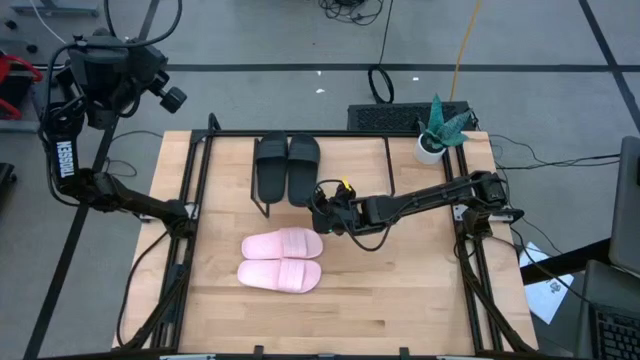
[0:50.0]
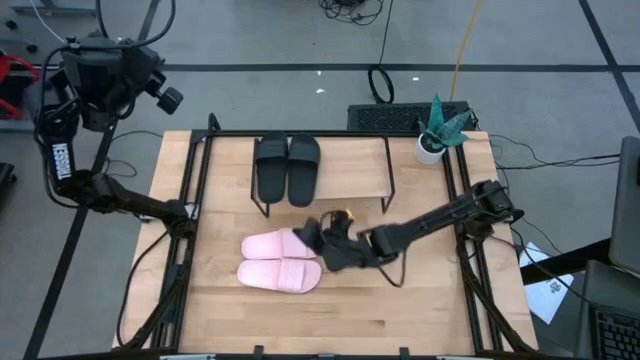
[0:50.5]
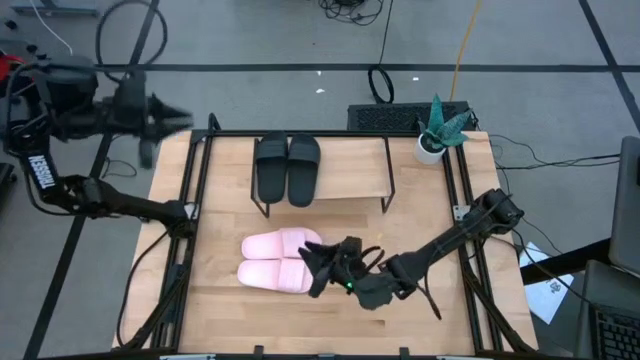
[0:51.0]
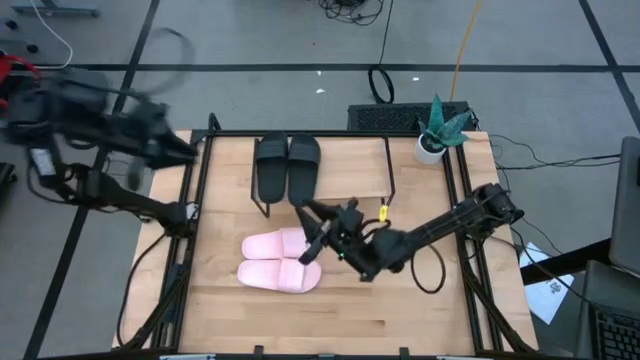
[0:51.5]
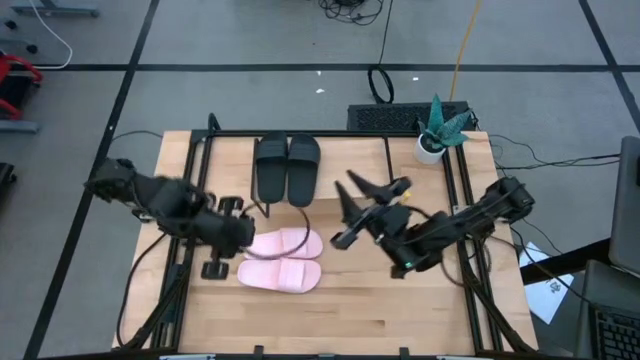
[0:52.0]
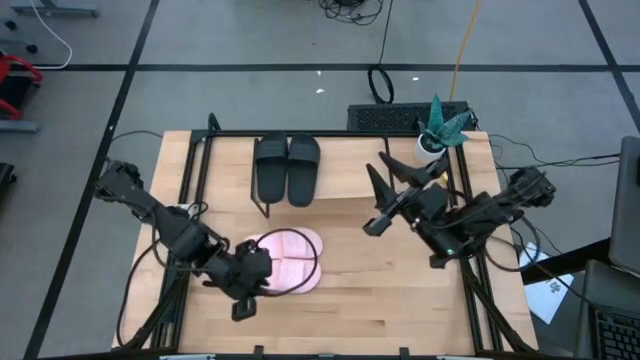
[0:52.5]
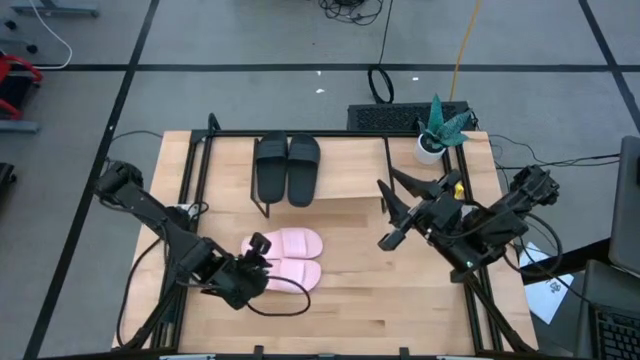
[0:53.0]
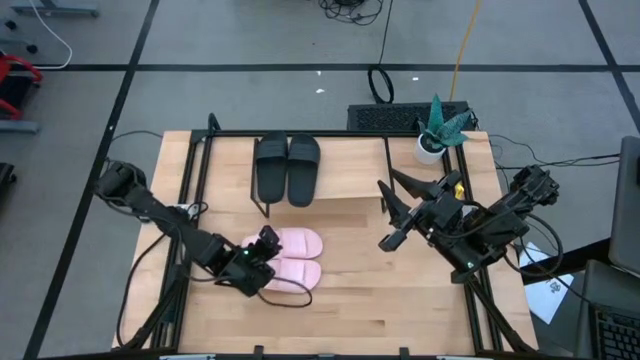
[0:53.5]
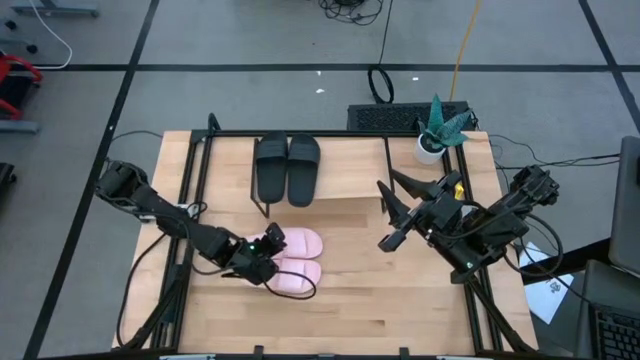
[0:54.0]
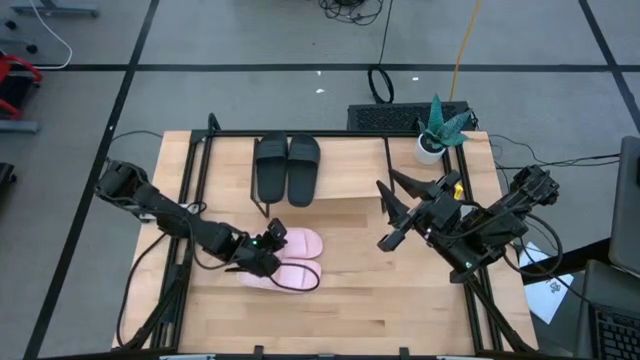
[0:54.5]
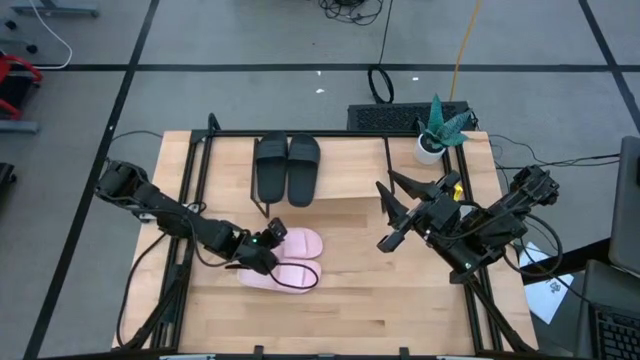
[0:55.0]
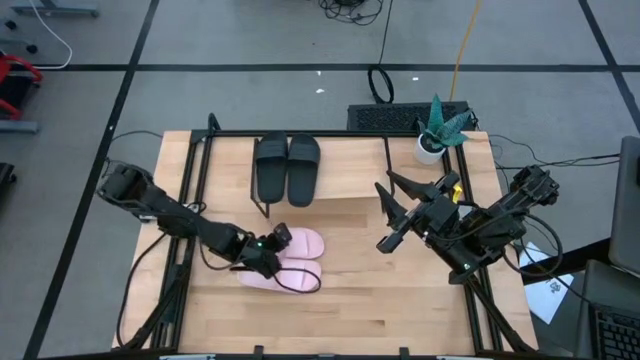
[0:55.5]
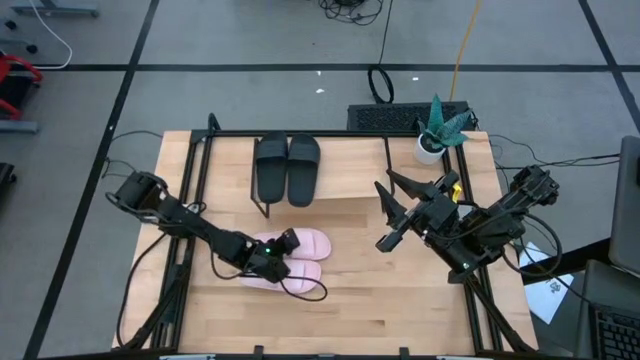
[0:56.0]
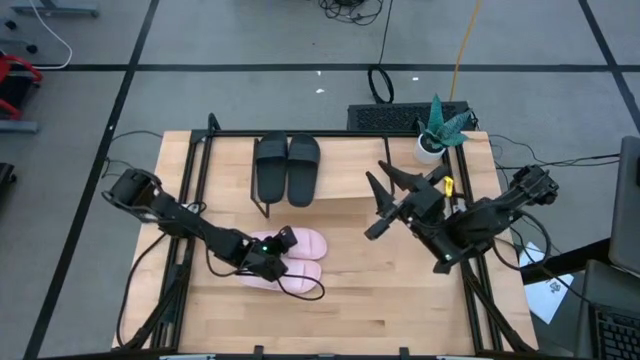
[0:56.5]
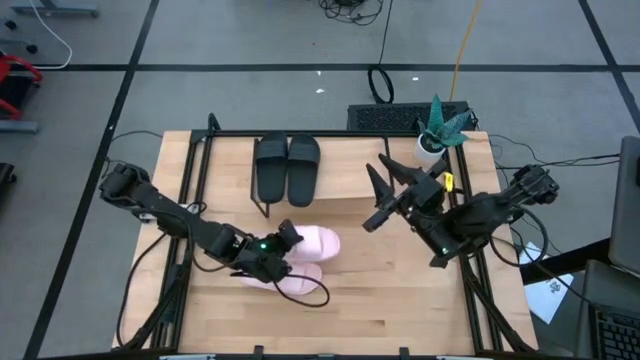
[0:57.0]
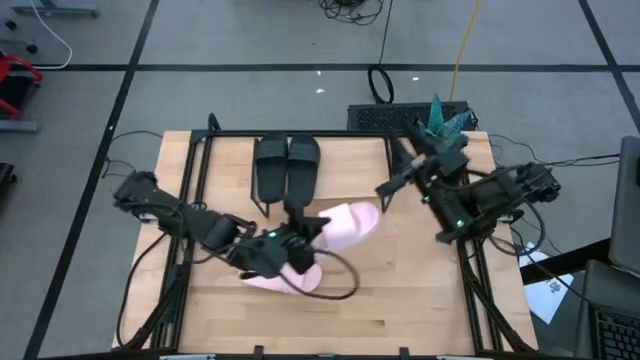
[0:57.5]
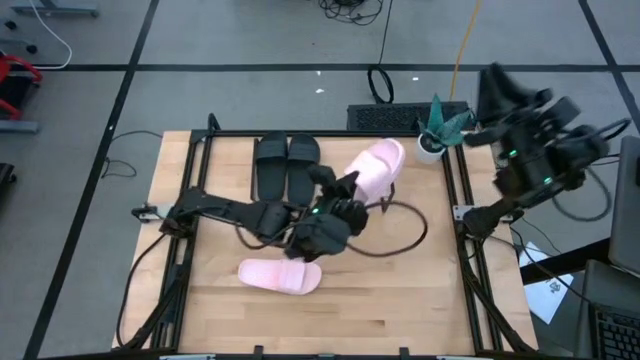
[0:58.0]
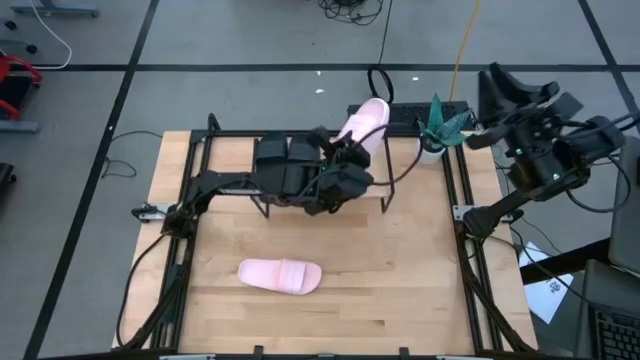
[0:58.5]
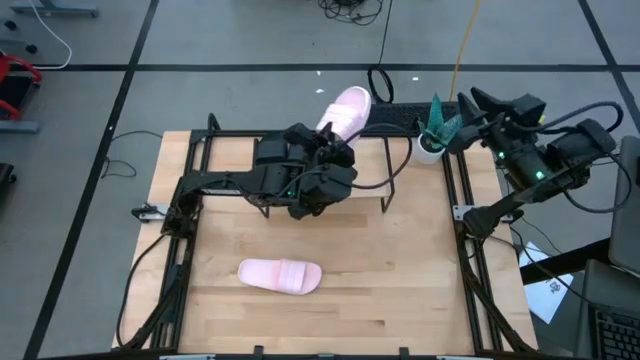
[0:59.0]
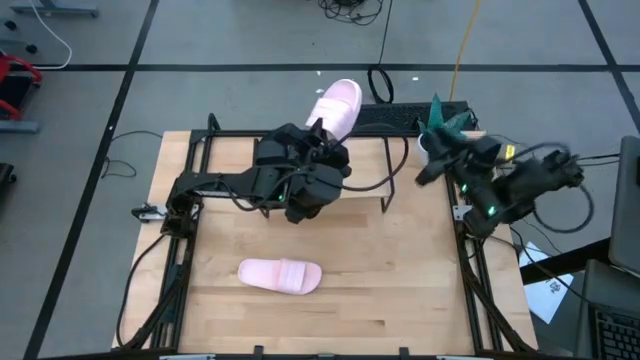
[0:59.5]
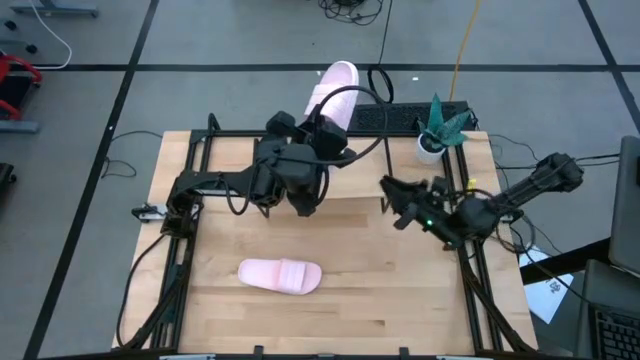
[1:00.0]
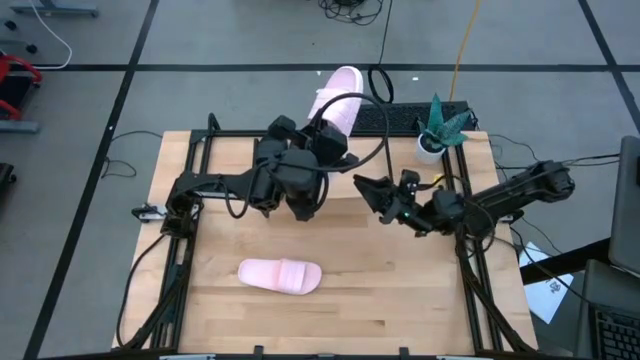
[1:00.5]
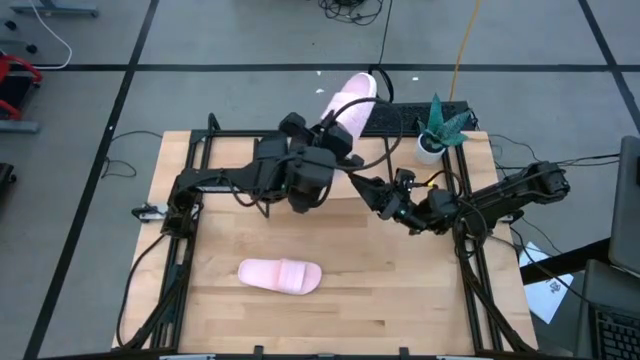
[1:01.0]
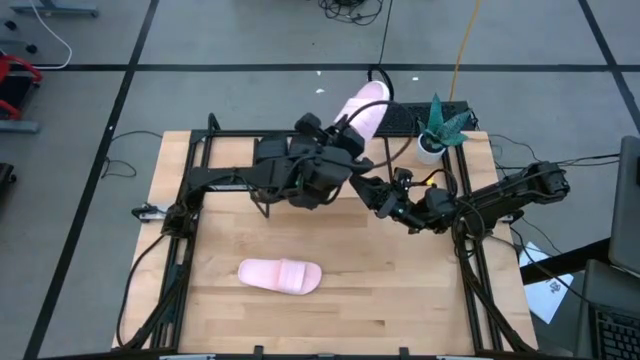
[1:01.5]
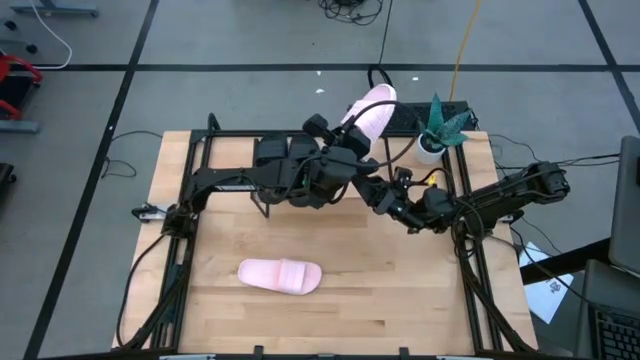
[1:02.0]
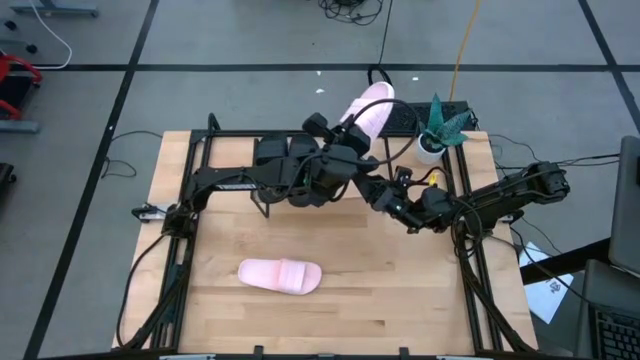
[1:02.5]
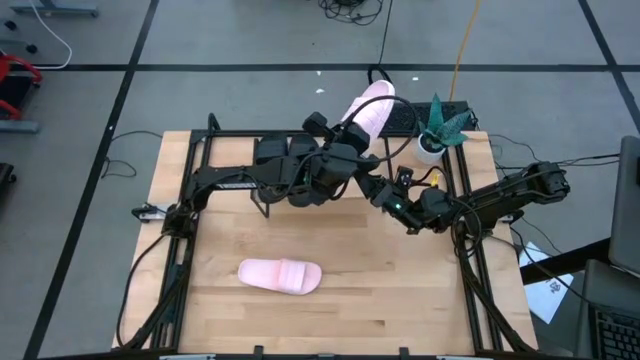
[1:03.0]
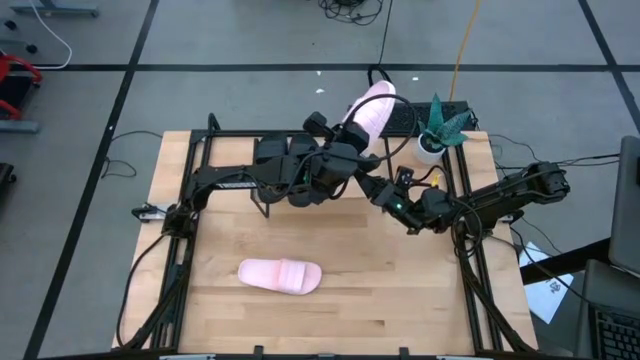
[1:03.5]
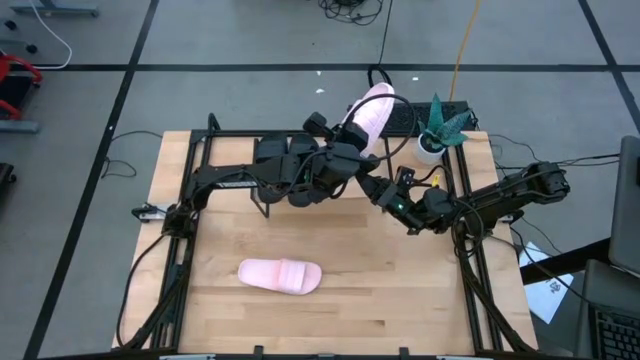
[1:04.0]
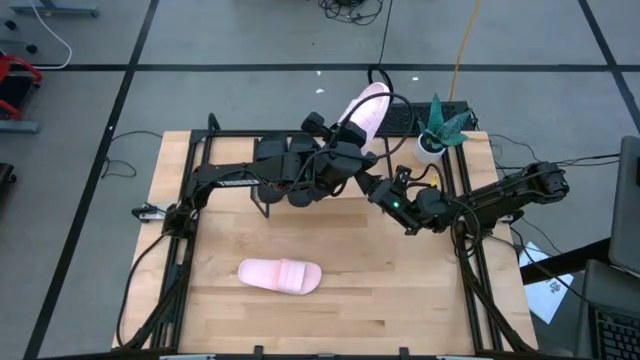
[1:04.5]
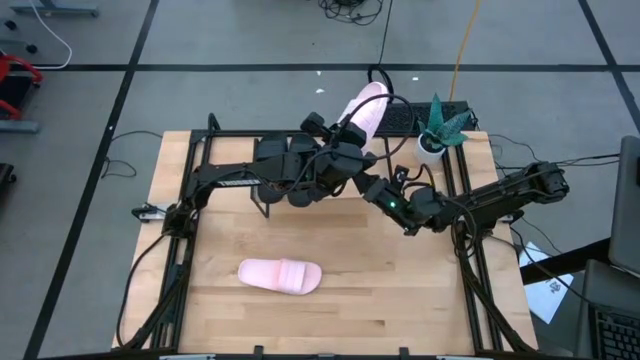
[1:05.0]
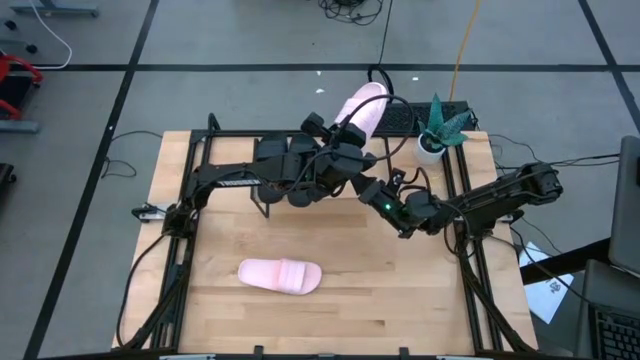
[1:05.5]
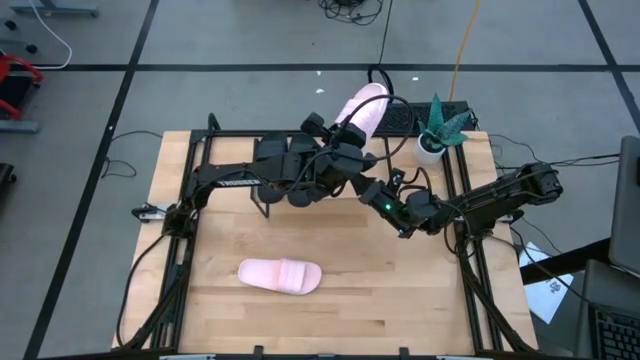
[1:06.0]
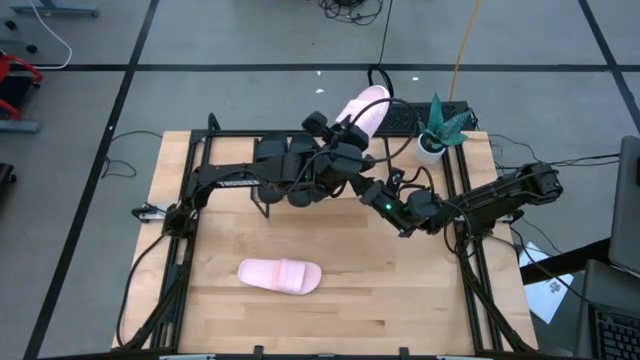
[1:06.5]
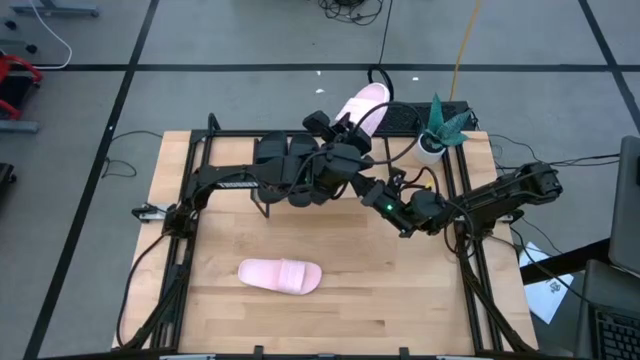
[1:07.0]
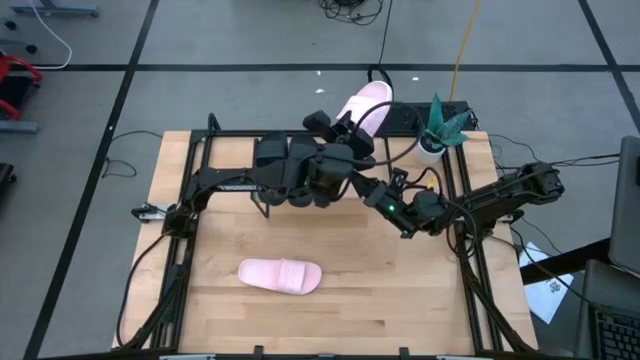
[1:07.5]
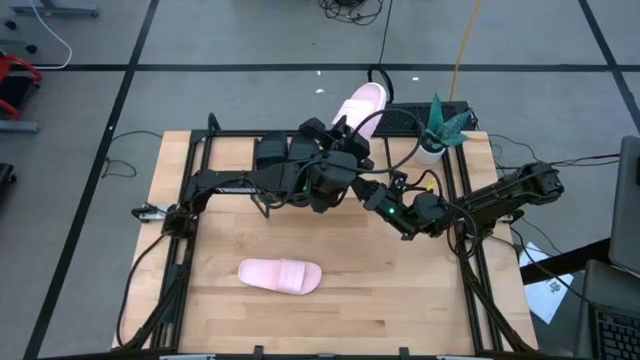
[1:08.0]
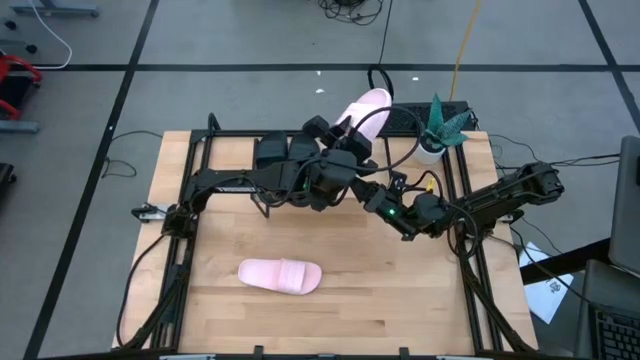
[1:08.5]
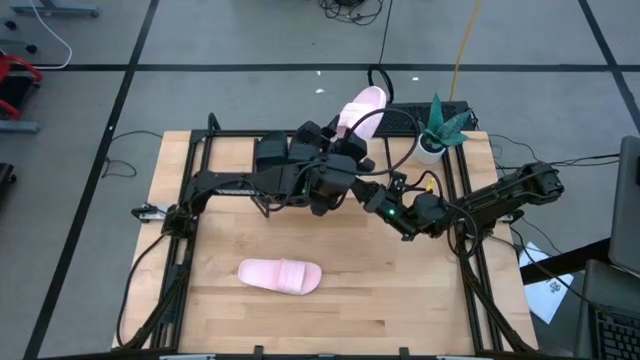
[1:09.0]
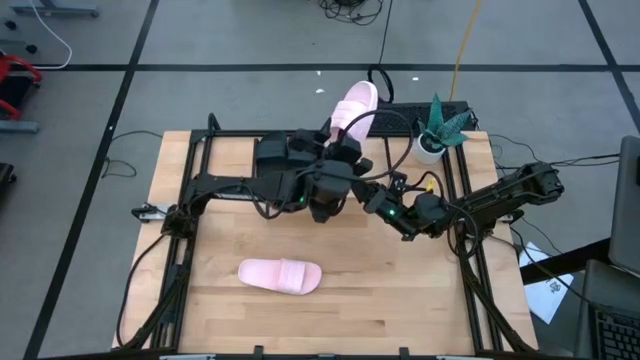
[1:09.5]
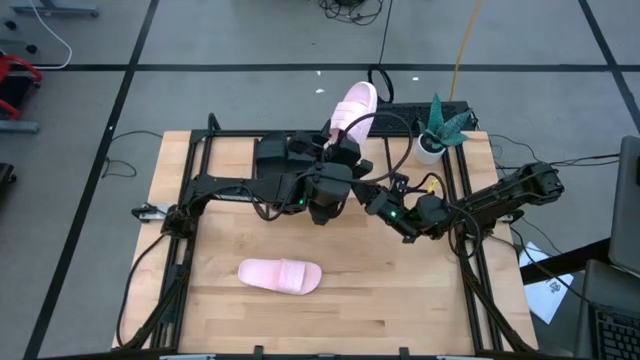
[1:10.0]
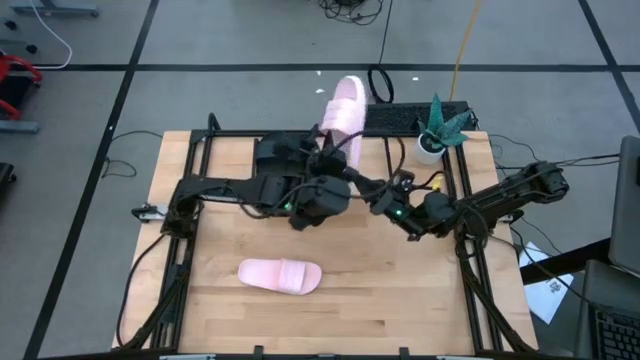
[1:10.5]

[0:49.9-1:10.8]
Task: Pick and place slides into the shelf
Put the top pink slide on the shelf
